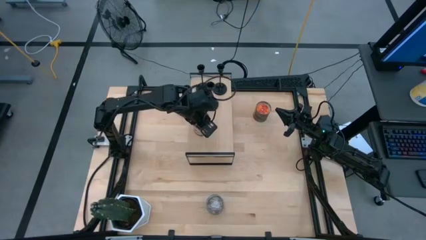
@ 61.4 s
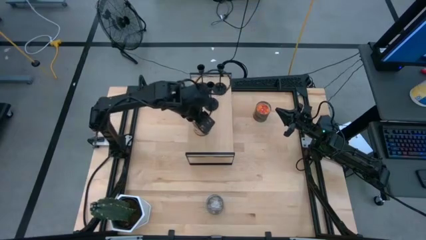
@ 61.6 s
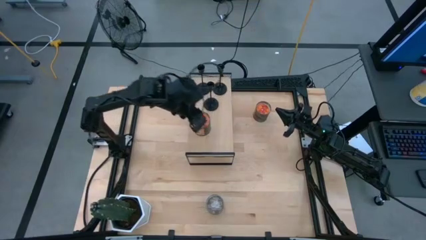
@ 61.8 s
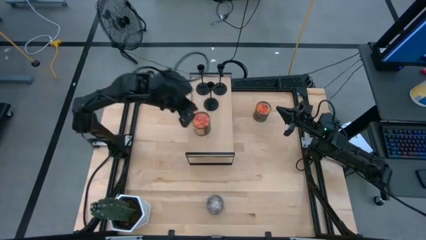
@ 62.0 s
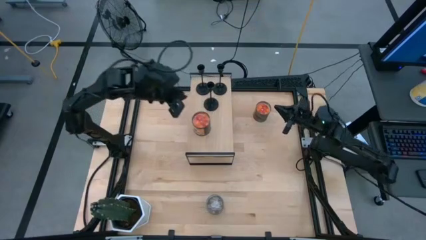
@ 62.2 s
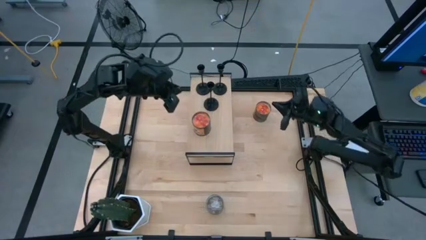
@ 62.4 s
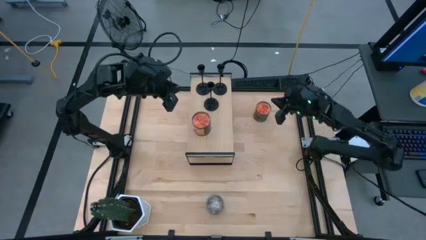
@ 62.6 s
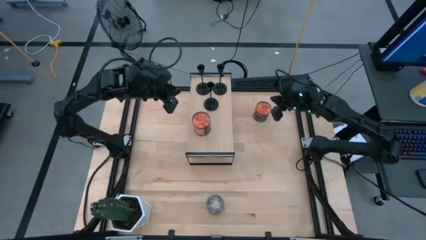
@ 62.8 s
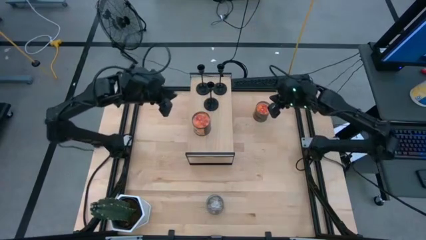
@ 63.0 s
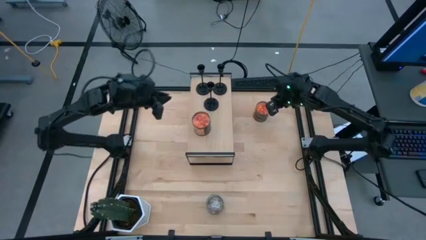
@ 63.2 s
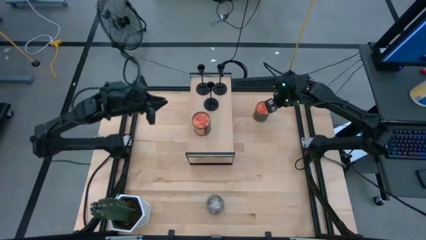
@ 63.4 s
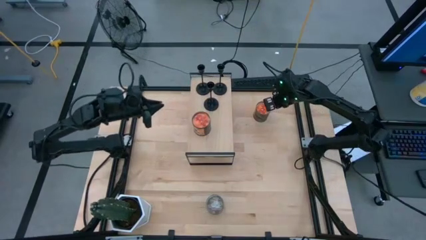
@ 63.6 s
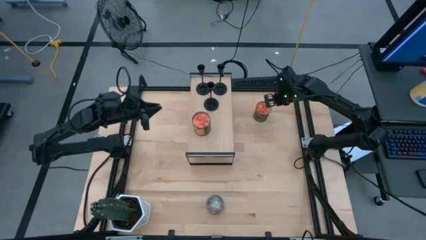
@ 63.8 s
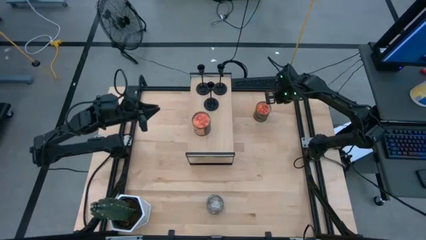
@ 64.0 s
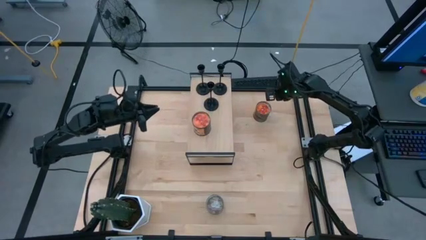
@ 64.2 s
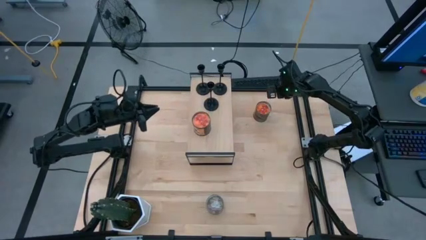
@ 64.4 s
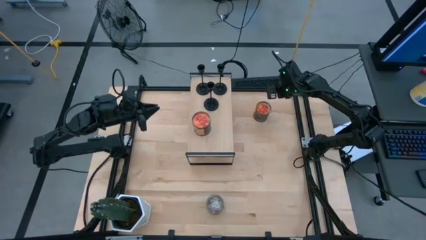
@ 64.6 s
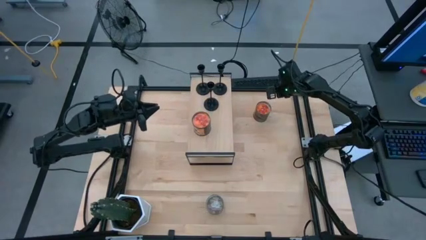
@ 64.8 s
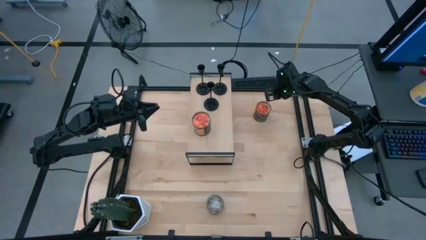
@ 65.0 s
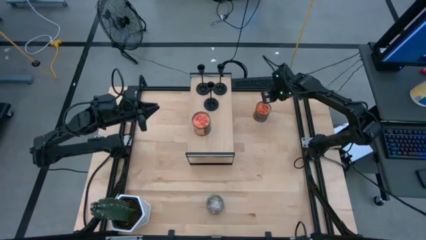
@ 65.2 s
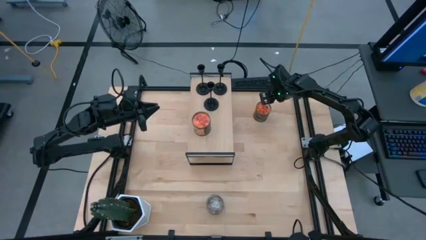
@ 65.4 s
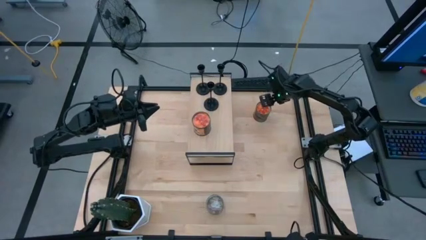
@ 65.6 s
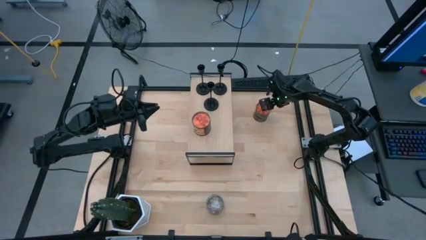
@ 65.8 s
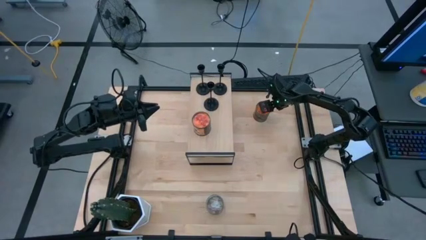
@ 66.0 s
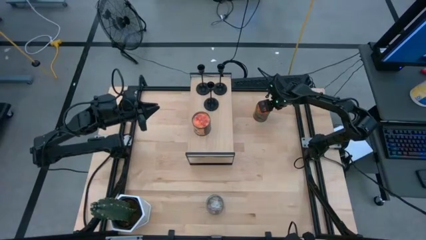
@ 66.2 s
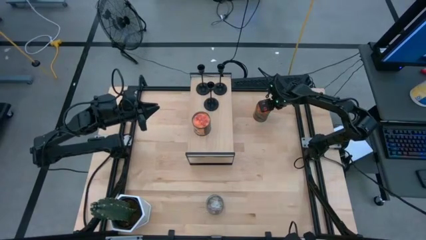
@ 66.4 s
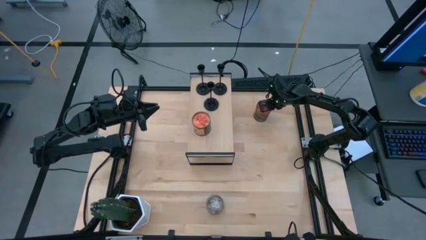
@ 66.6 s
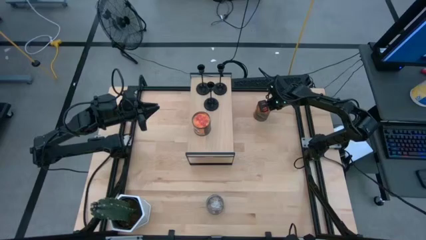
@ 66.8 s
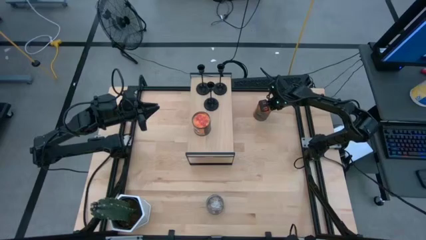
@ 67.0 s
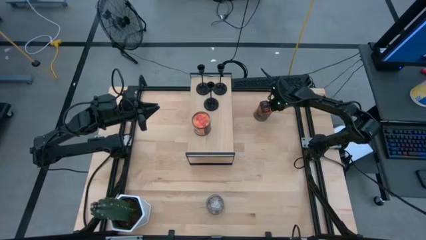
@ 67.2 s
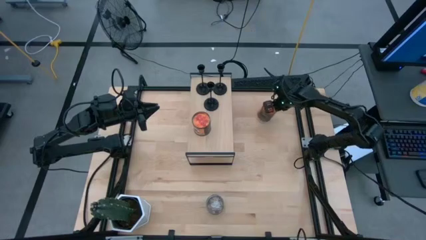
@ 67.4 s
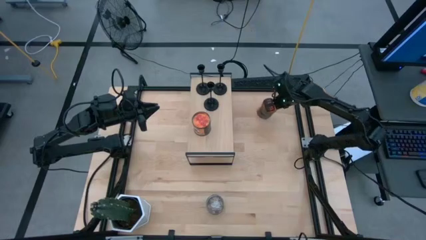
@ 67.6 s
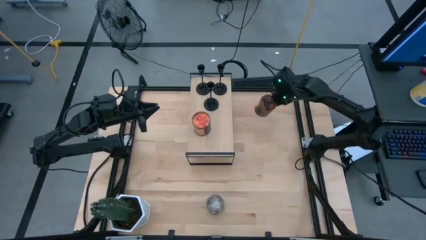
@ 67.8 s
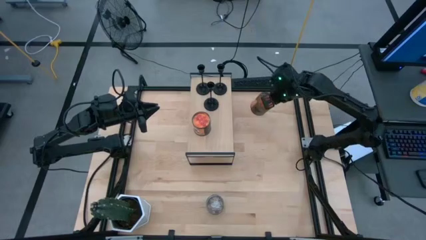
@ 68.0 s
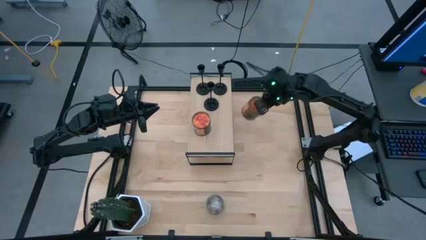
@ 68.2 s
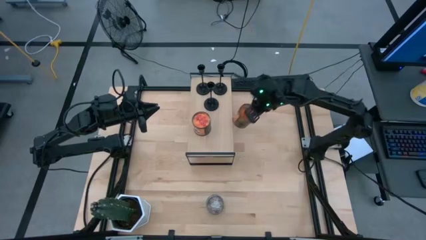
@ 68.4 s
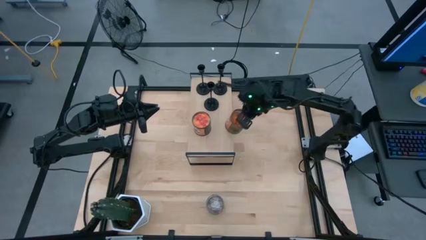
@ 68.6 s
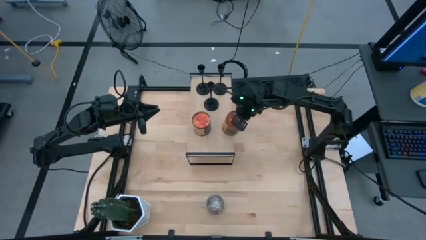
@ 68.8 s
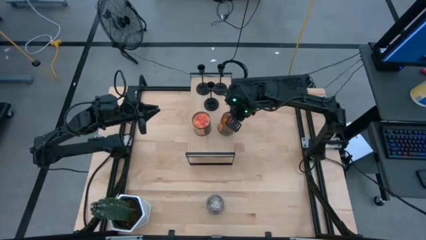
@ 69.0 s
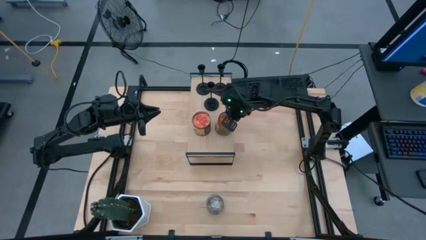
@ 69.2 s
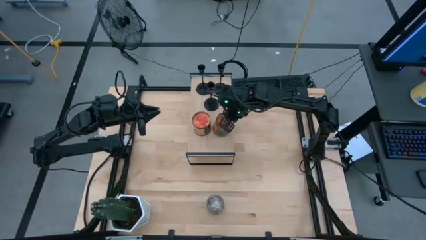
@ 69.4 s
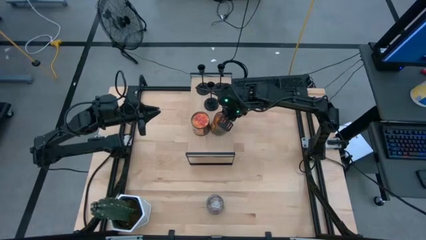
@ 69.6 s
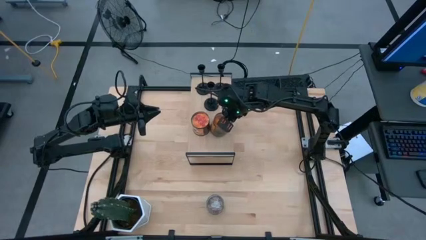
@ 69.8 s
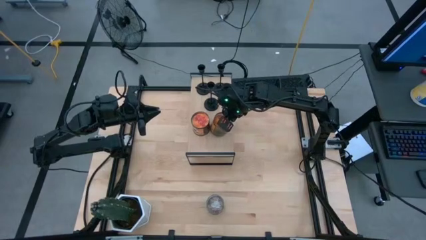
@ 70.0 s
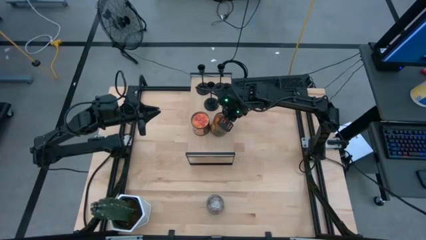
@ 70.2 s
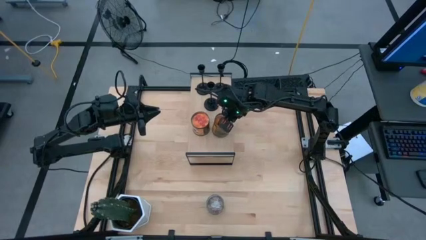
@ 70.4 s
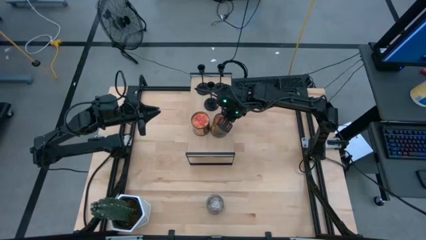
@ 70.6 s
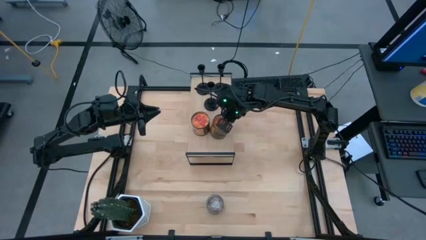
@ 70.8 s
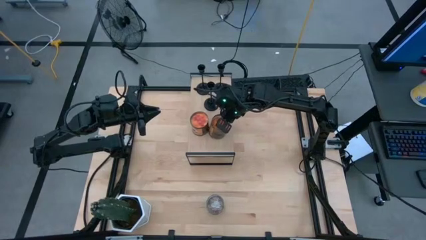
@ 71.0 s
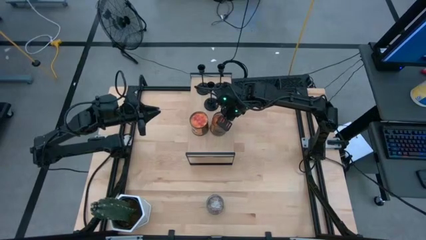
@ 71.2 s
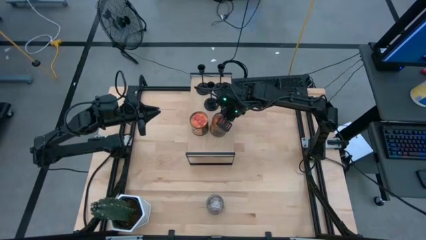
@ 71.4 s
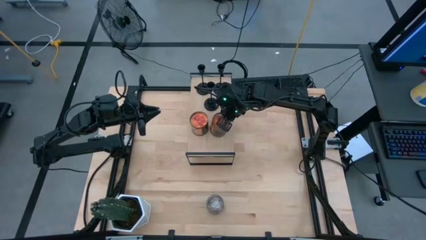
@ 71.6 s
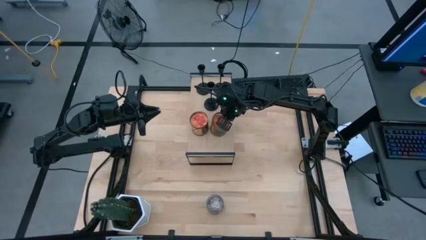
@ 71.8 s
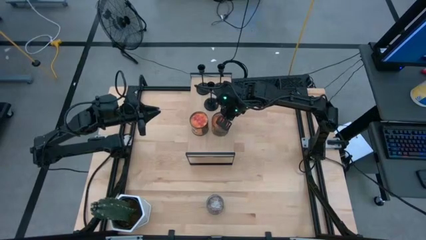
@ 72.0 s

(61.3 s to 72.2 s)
Task: Pick & Place candle stick holders
Put the orange scented candle on the shelf aligned with the other orange scented candle
